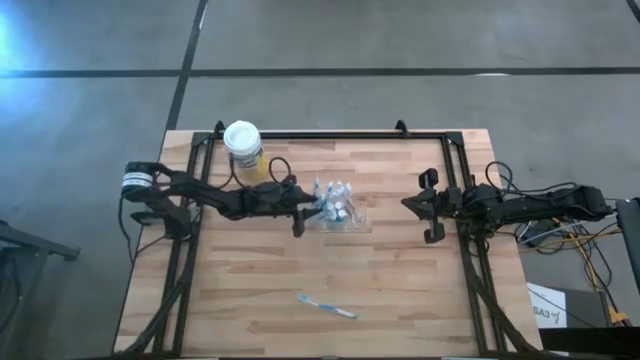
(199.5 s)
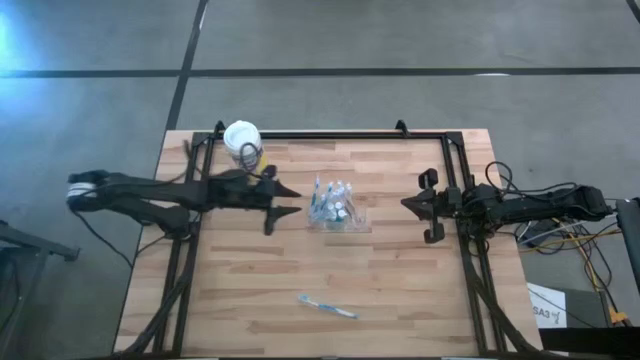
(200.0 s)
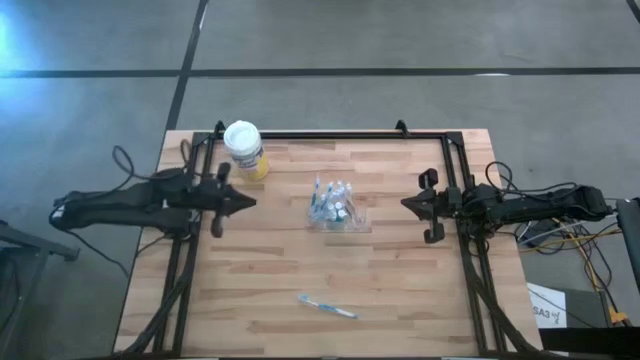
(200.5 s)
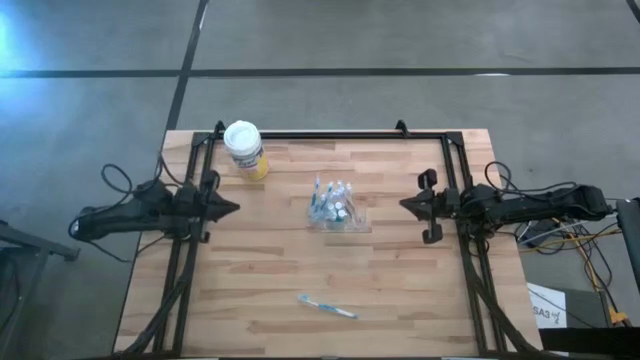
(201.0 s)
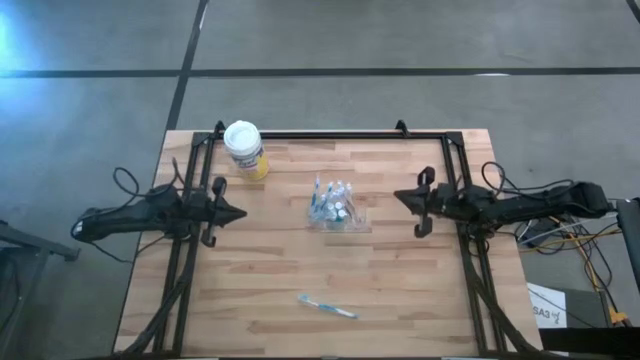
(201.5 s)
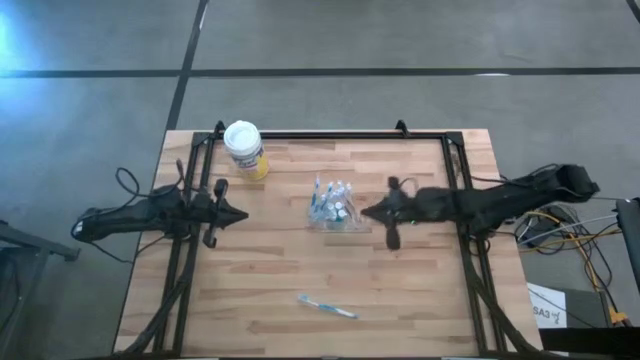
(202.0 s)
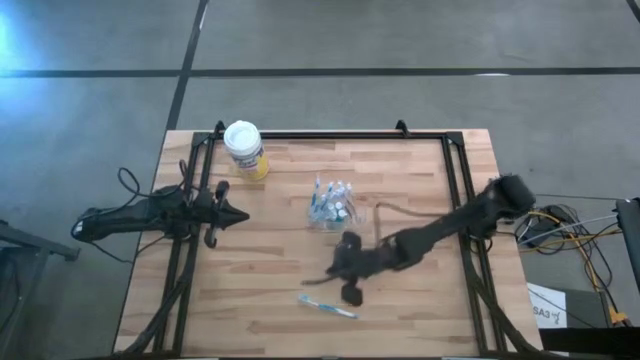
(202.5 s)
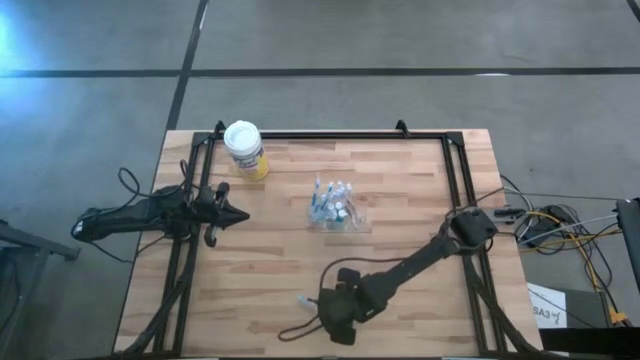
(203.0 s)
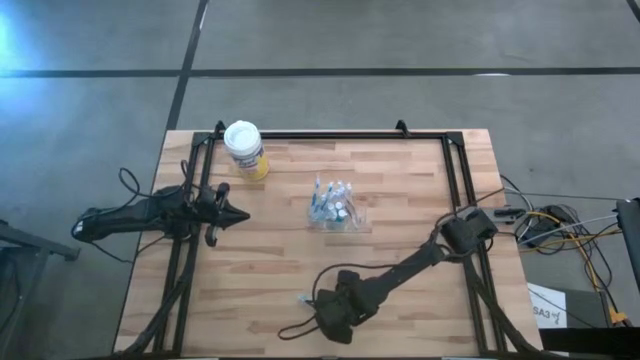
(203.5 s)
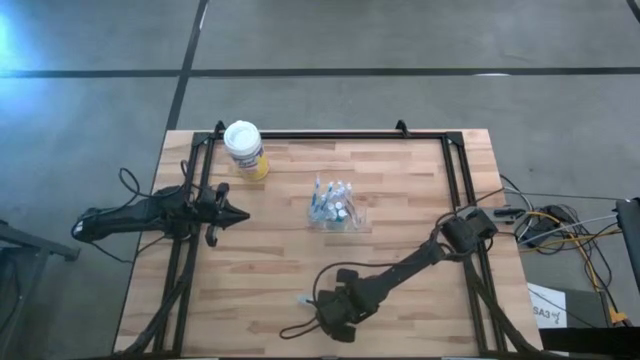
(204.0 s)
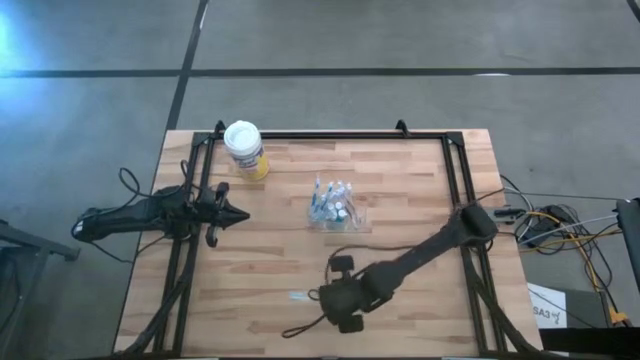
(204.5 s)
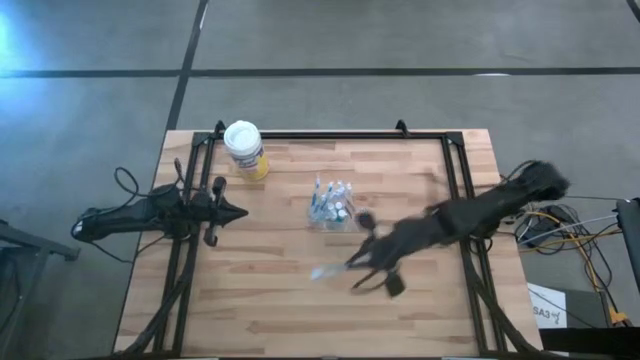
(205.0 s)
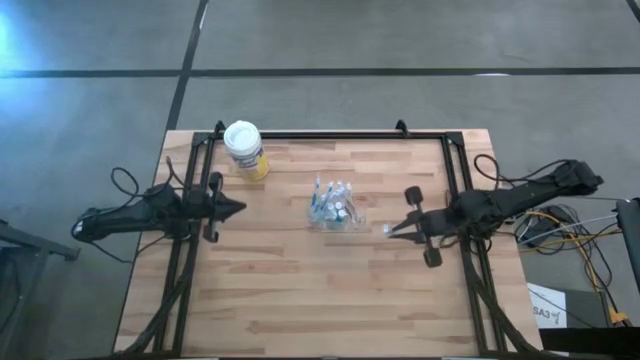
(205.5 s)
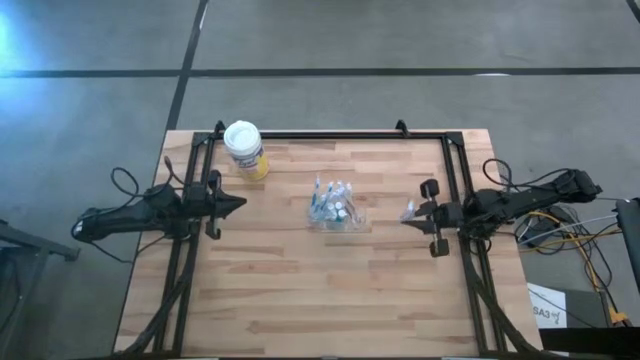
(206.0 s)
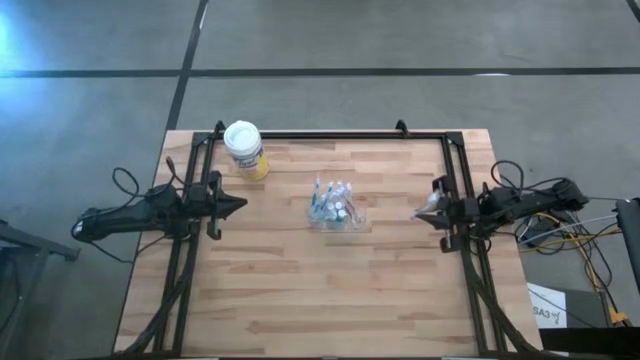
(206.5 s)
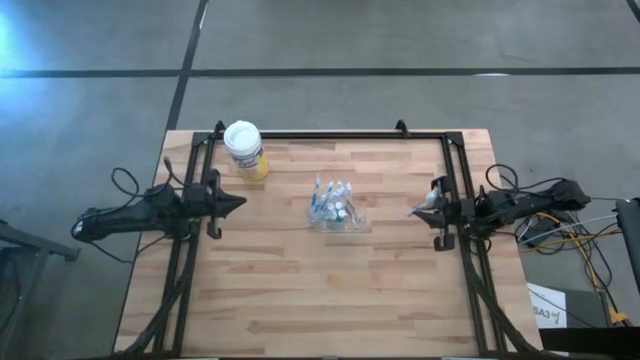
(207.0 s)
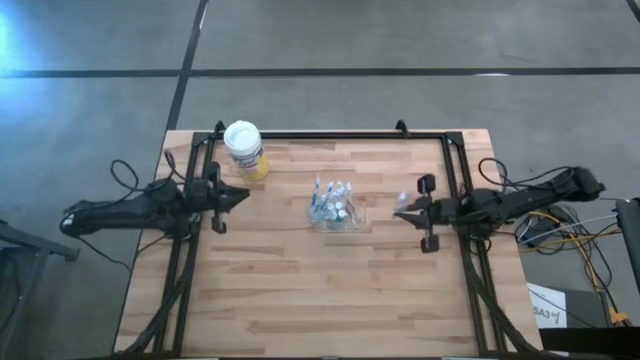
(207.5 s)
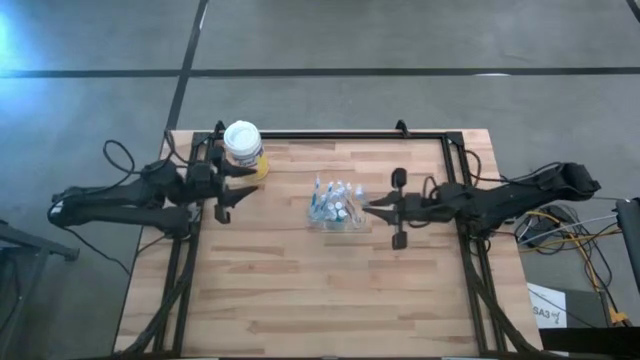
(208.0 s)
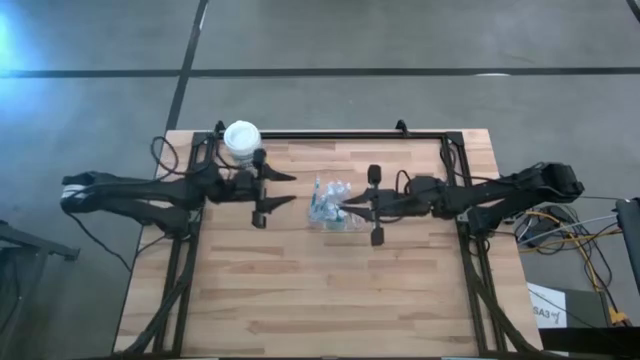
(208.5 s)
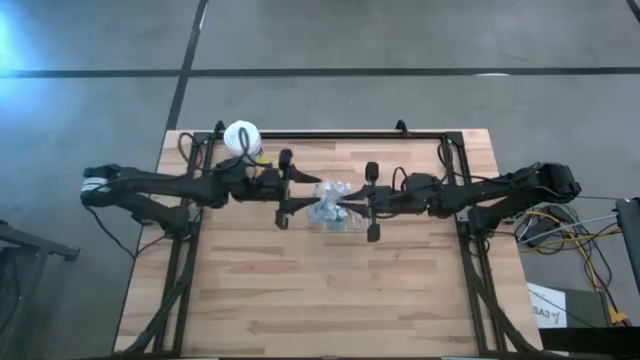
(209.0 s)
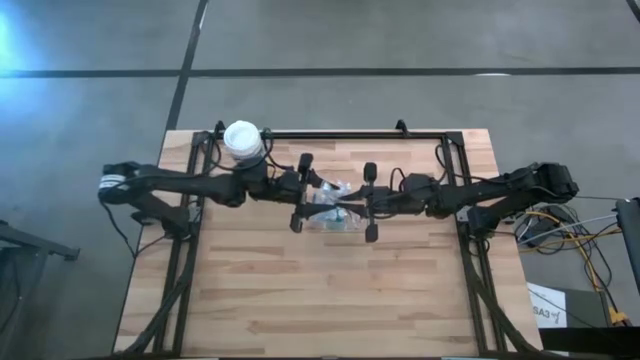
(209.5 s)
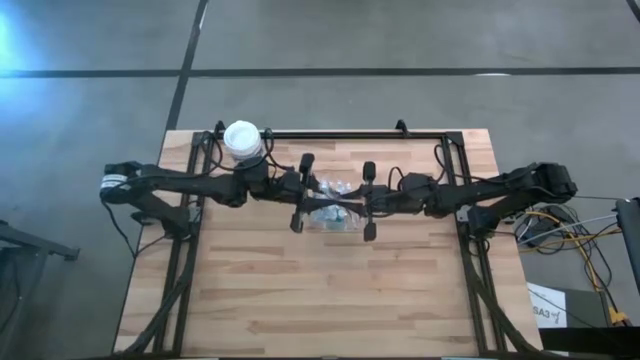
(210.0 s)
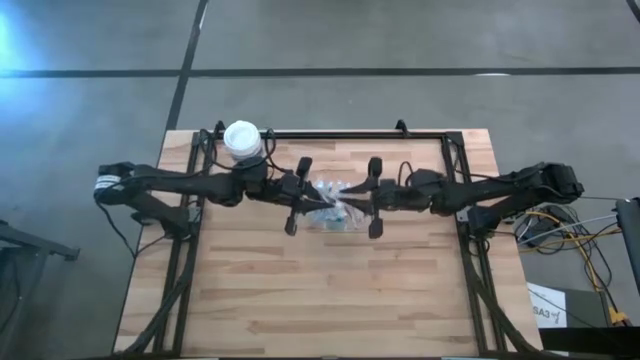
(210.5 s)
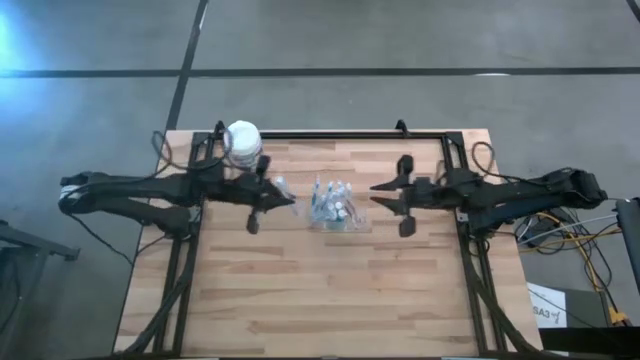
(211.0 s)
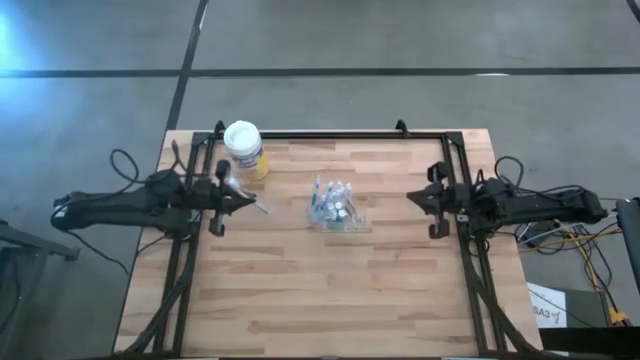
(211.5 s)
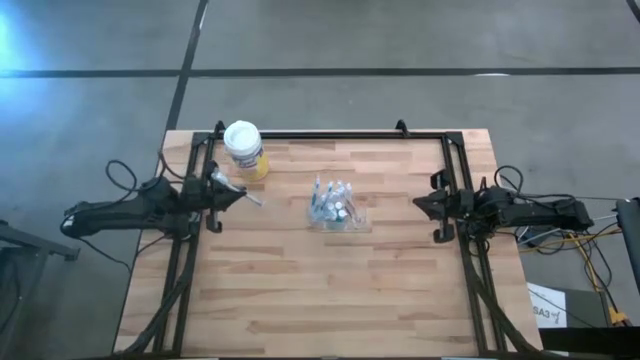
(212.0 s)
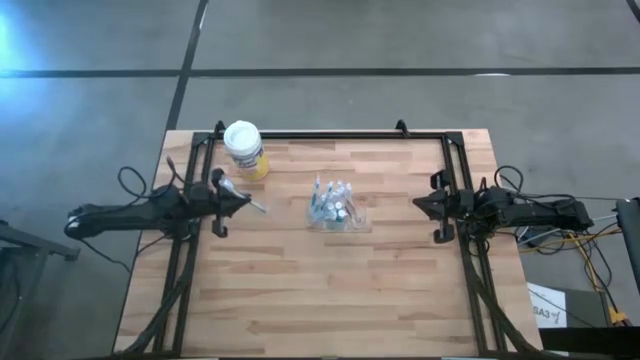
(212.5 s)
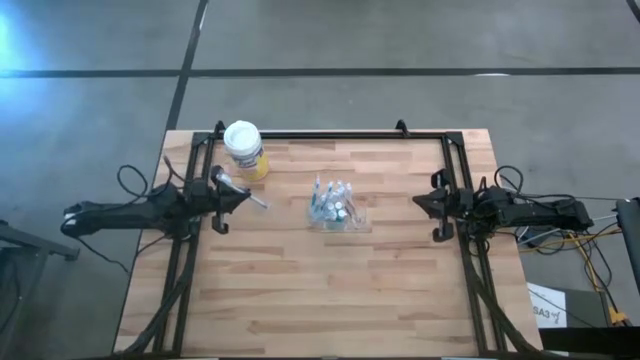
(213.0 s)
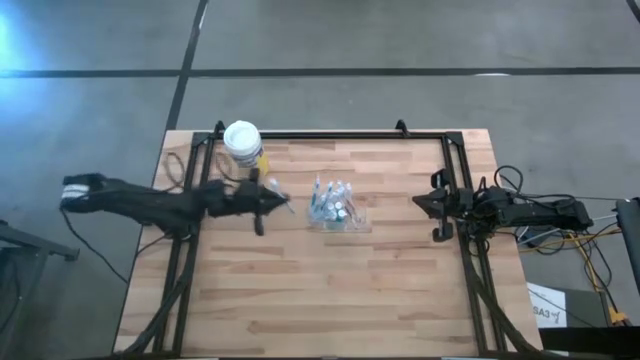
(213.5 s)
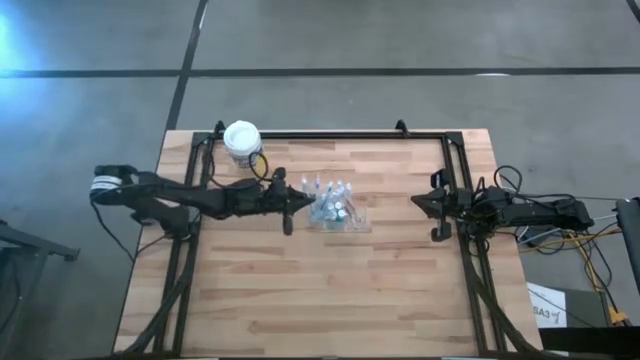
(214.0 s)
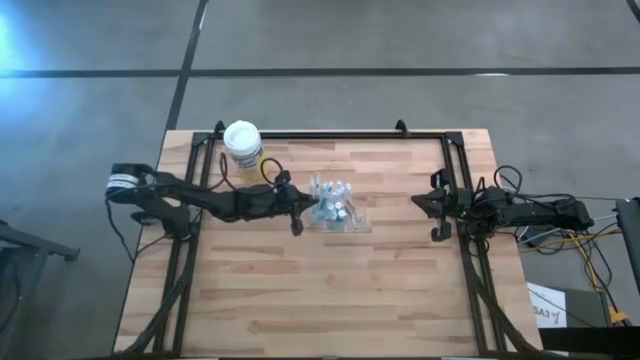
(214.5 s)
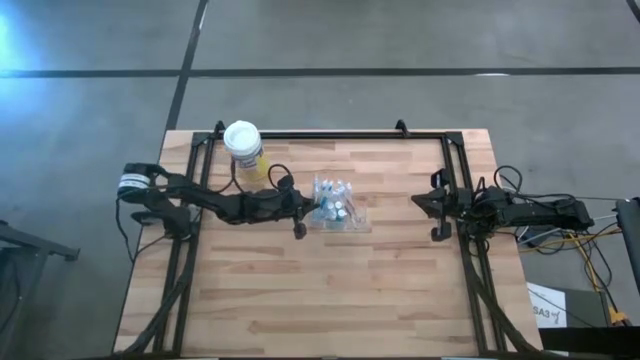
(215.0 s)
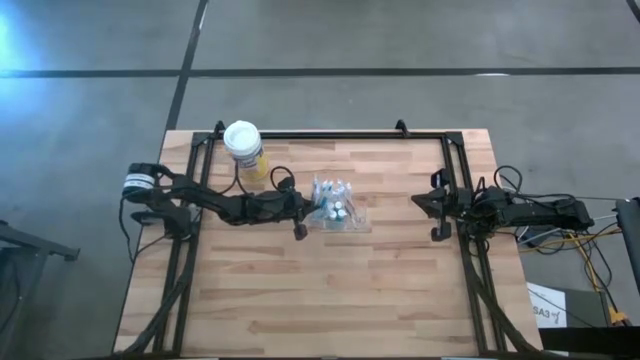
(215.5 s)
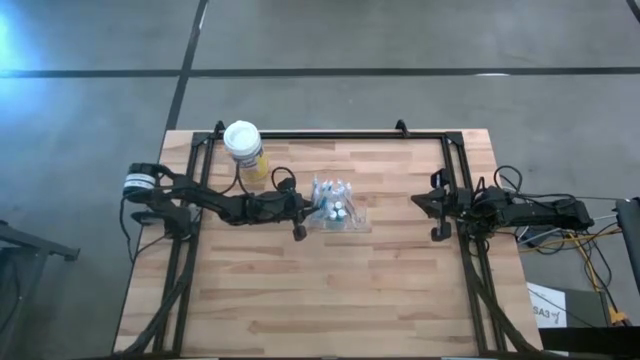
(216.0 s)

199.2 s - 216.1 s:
Task: Pick & Place toothbrushing station
Put the blue toothbrush into the left compartment of the transparent organizer

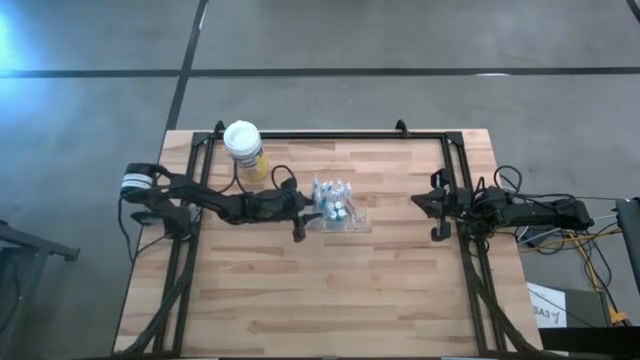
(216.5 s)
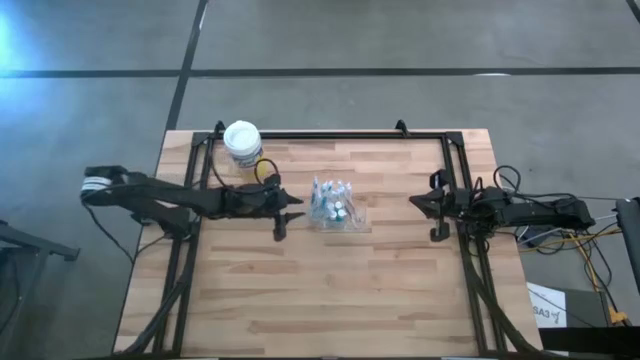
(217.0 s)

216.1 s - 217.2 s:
Return to Home Position

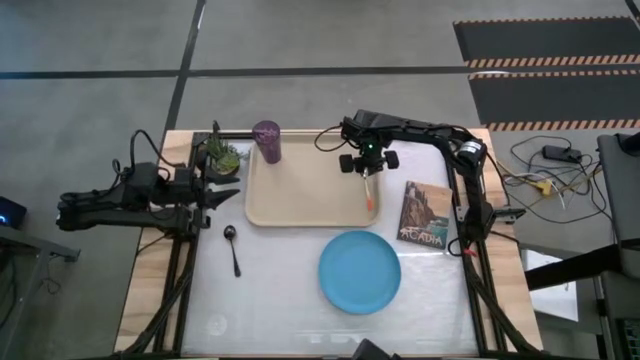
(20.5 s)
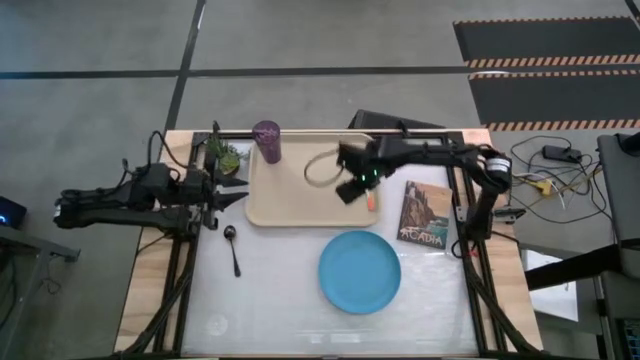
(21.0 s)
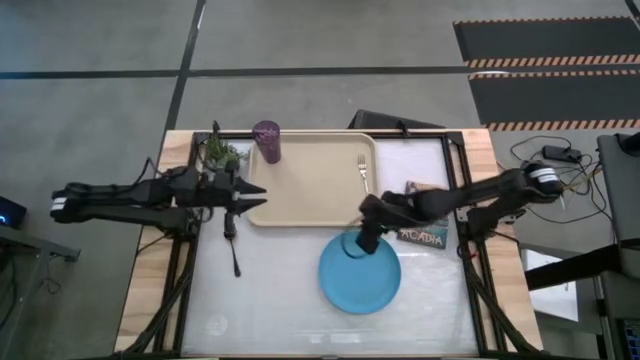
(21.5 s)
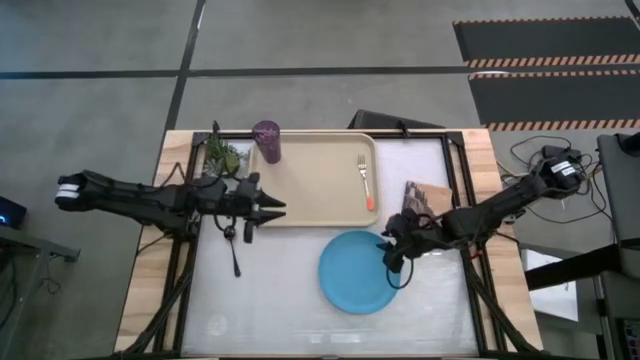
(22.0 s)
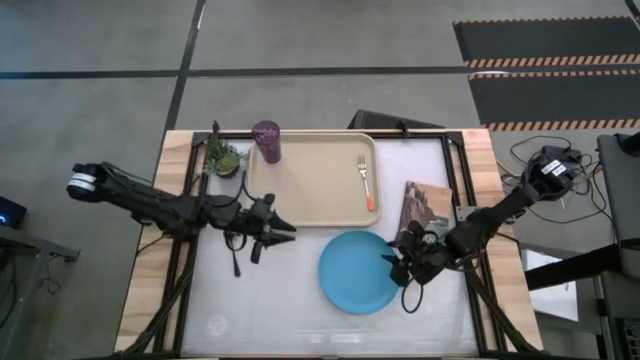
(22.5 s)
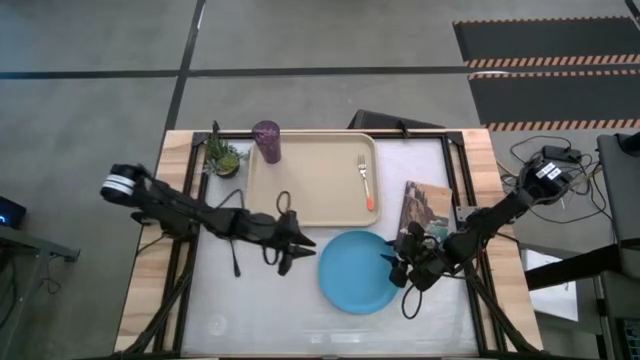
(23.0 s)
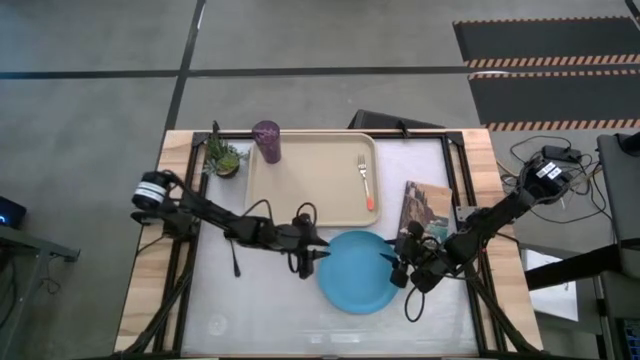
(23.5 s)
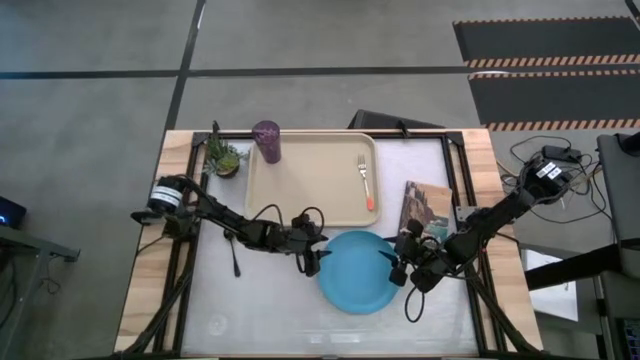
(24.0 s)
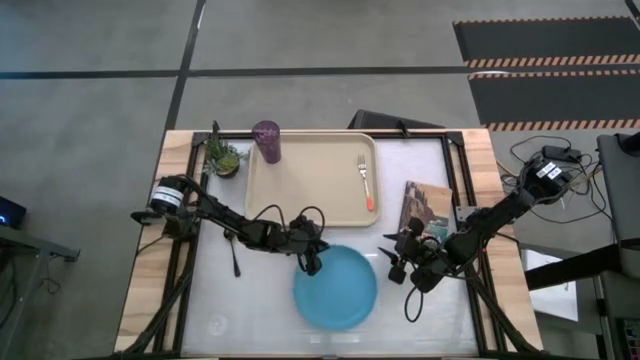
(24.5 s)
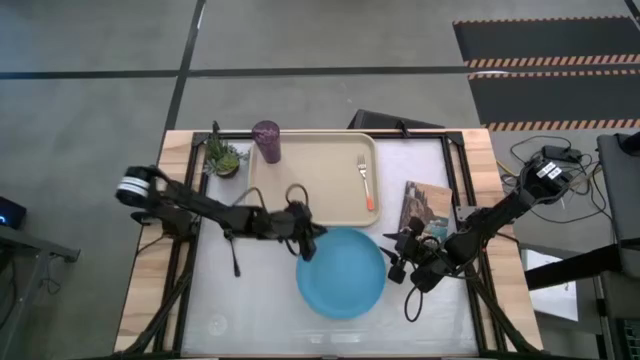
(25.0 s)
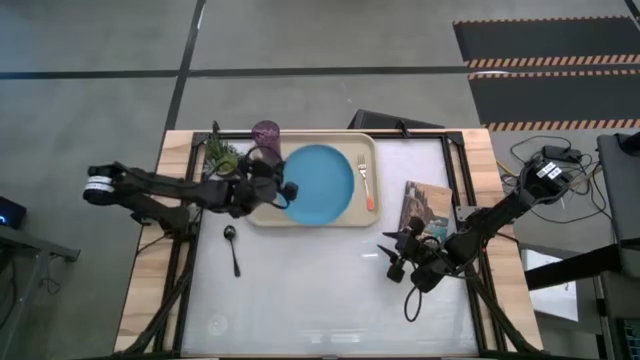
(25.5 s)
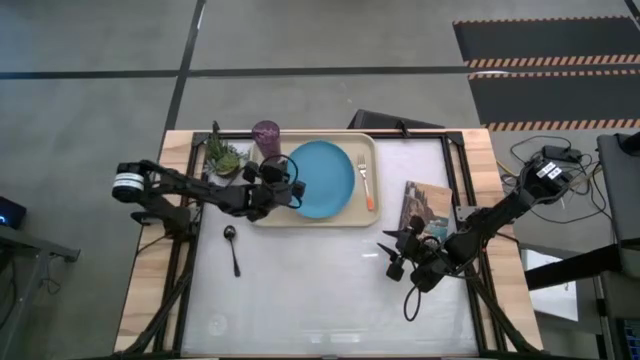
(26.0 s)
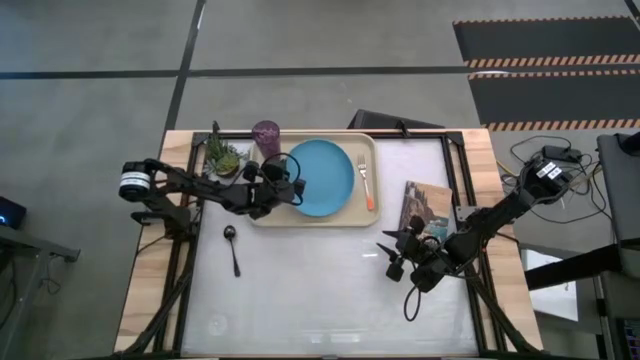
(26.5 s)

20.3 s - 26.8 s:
Task: Pick and place plate/cup/fork/spoon on tray
Put the blue plate on the brown tray to the bottom right of the violet cup
